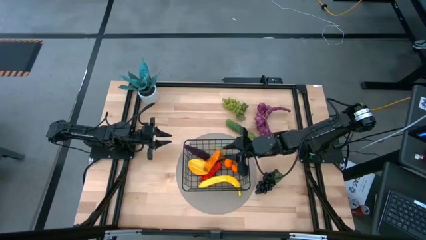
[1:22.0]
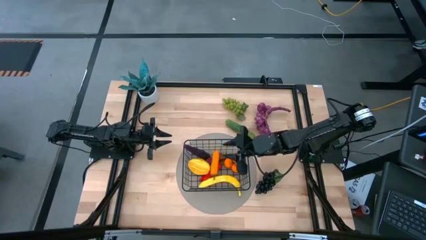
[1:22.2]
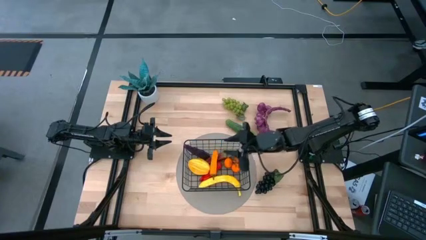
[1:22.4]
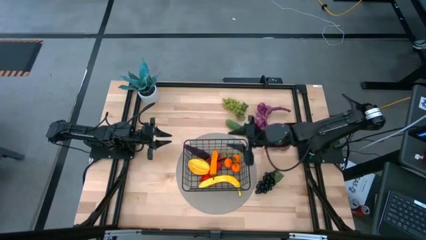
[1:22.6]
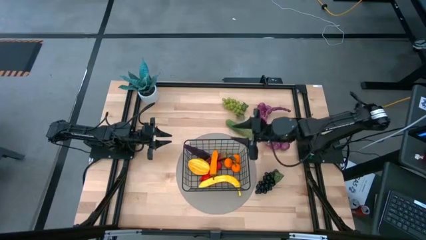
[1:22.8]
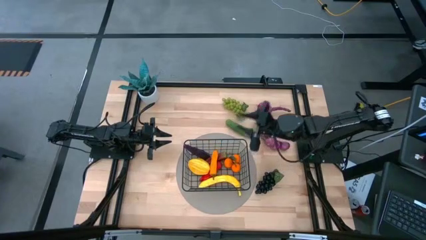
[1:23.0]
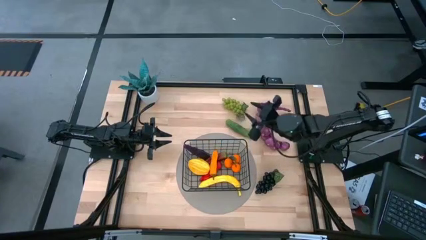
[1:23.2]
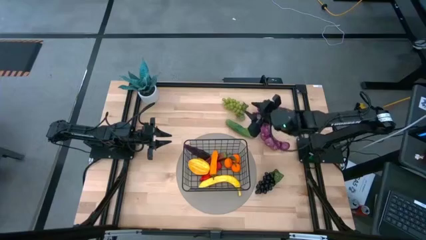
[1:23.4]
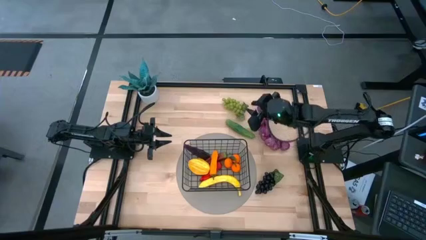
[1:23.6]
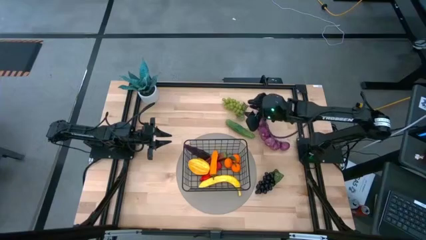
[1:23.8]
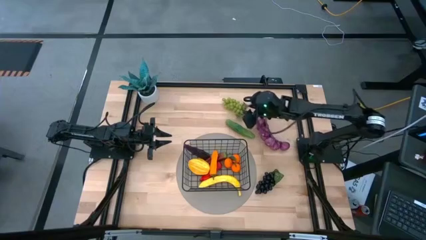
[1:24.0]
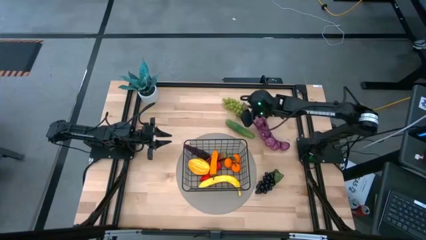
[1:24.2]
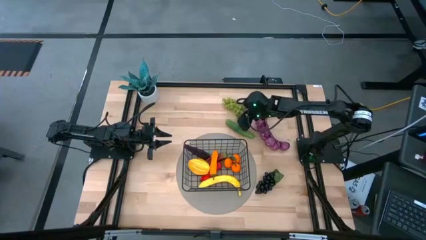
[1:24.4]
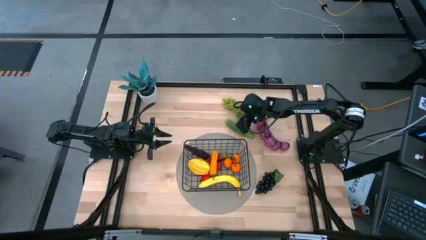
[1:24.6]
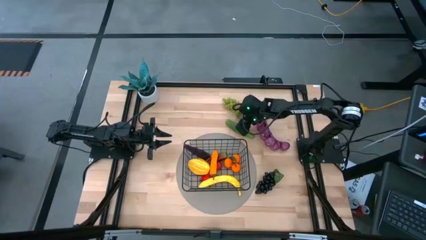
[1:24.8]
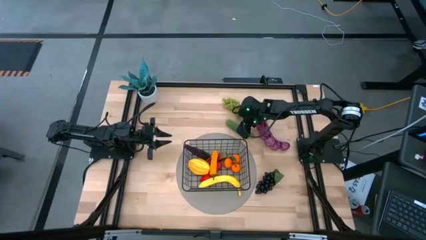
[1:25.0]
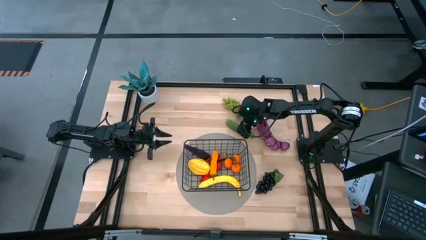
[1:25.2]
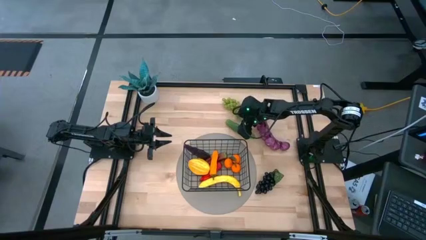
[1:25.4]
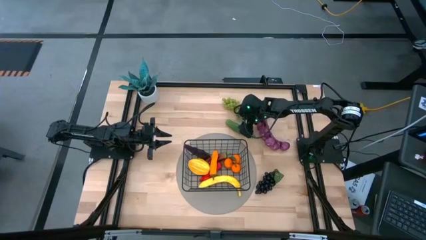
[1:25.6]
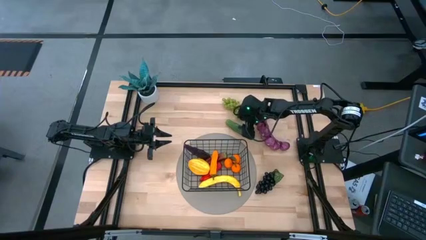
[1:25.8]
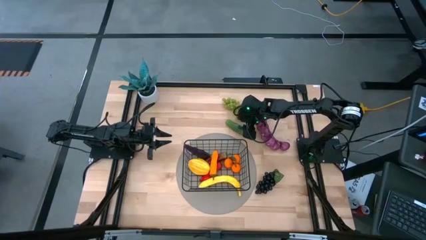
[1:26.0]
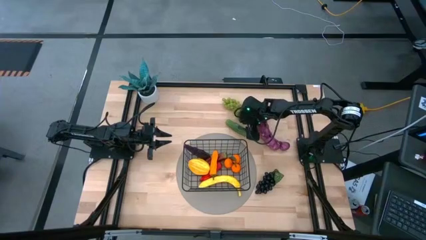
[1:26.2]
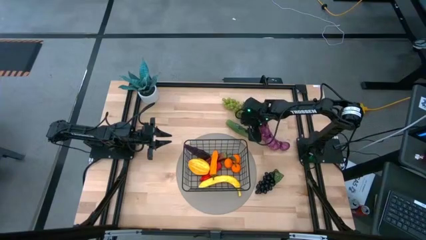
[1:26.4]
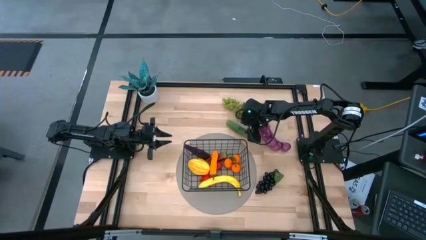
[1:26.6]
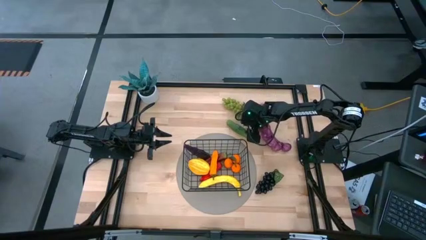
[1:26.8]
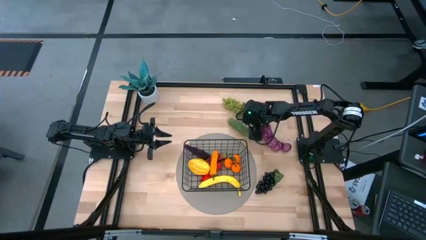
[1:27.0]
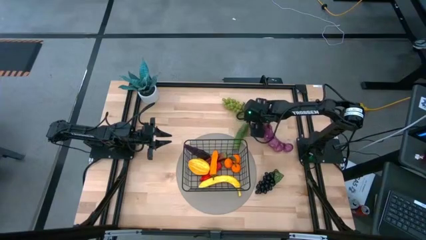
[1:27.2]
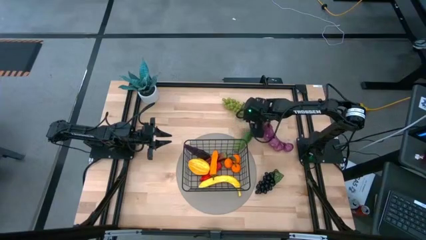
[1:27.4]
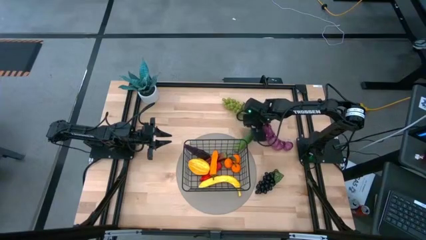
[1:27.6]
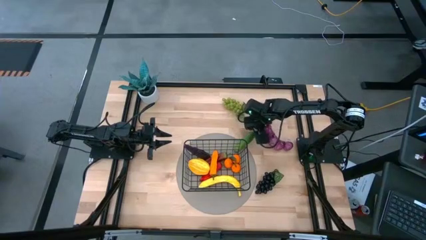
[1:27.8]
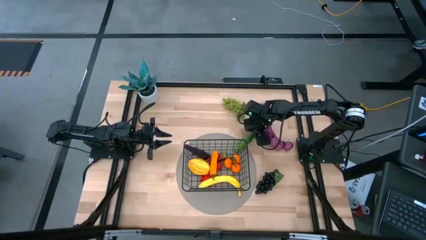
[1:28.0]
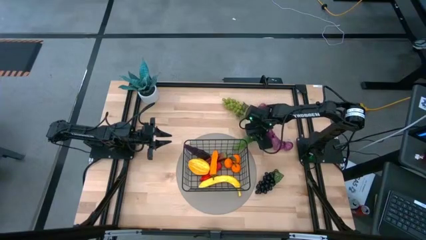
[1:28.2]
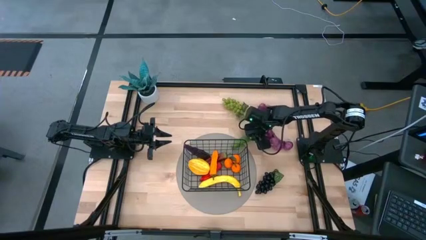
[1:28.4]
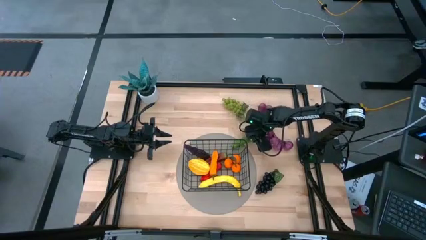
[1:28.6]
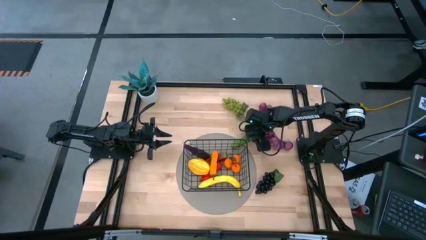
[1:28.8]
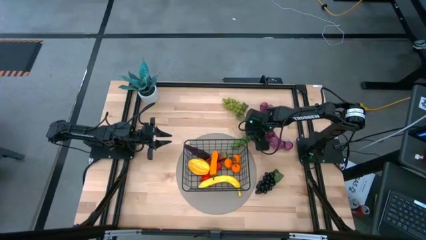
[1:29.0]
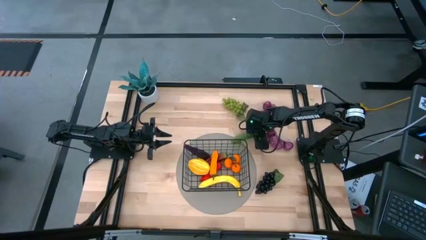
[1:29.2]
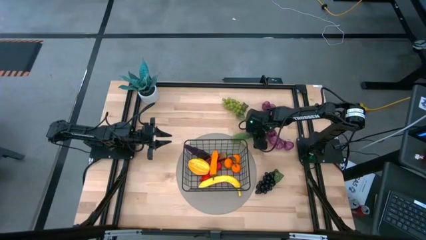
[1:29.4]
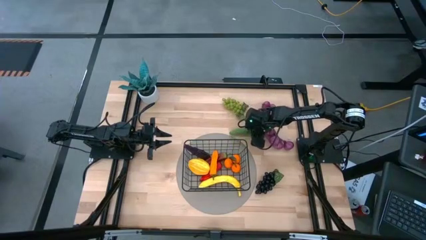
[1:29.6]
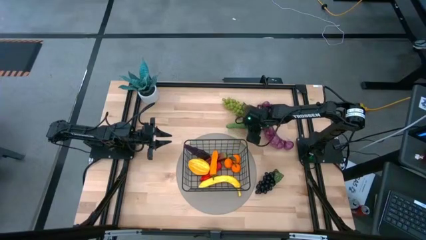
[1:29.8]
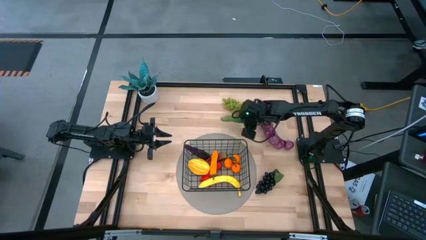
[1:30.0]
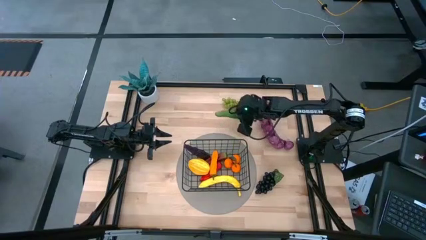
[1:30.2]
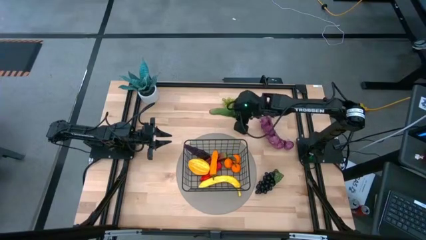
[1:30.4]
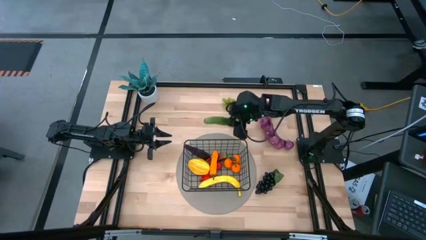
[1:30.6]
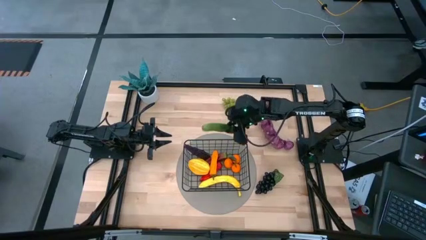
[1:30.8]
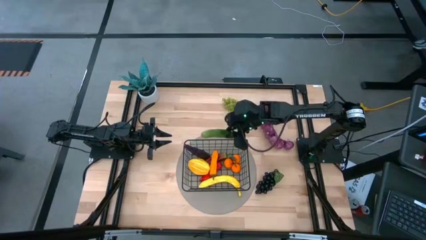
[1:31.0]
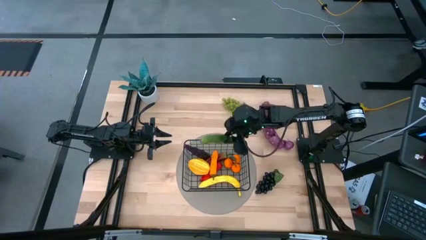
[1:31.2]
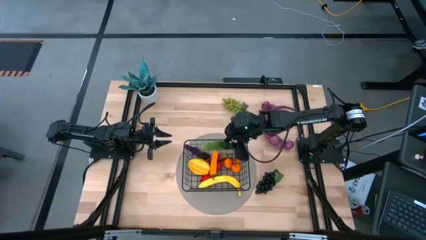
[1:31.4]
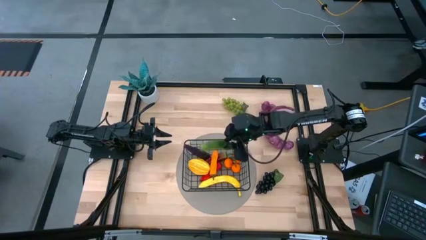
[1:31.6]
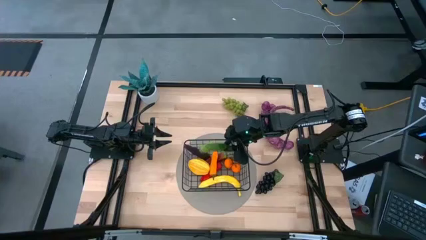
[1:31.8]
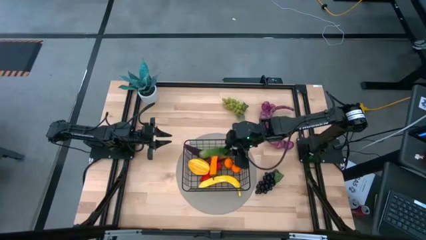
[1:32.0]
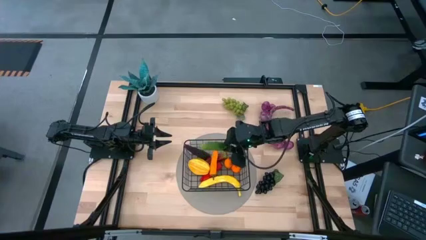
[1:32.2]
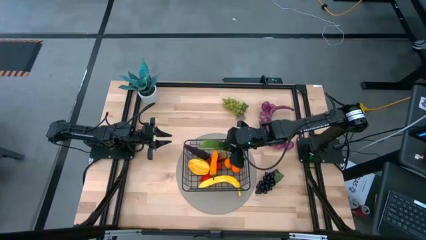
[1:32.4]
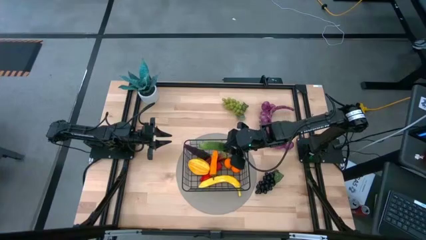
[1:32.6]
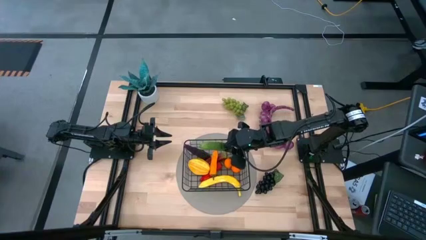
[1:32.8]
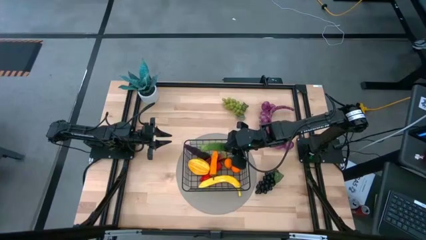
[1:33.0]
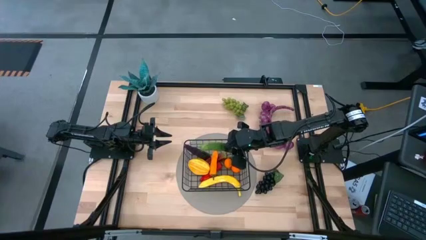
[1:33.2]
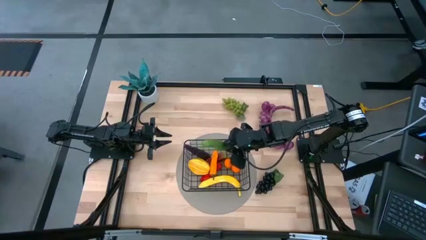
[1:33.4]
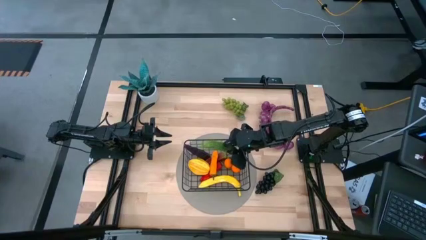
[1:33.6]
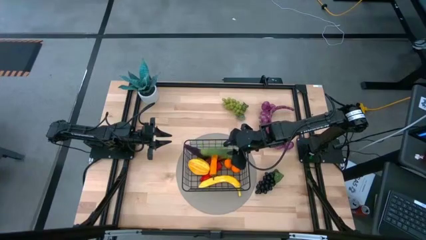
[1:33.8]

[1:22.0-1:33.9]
Task: Build produce basket
Put the green cucumber into the black wire basket
